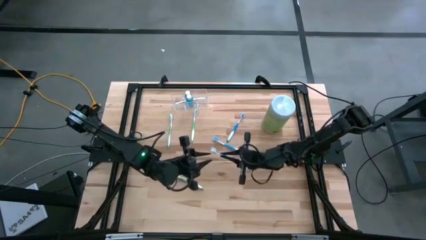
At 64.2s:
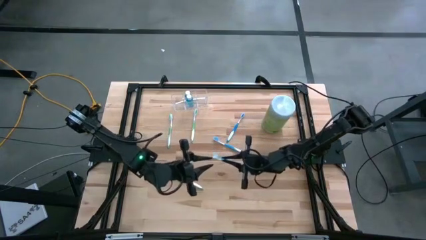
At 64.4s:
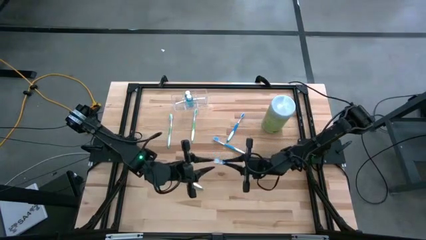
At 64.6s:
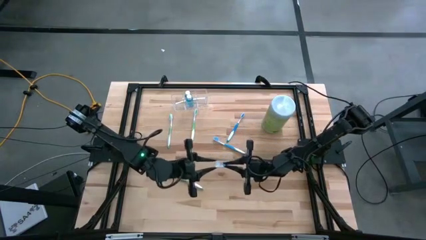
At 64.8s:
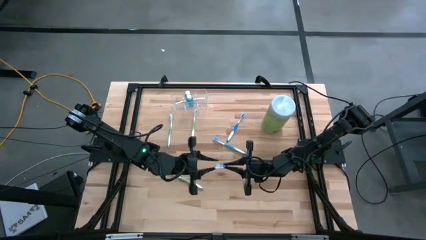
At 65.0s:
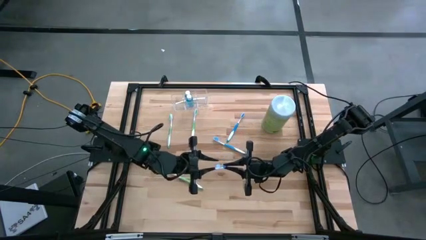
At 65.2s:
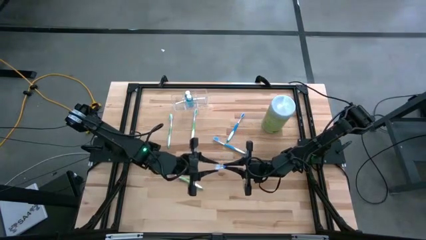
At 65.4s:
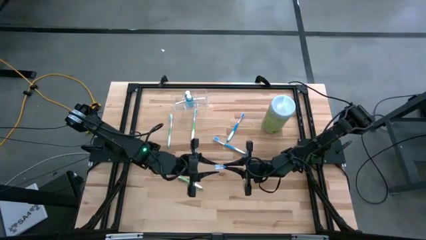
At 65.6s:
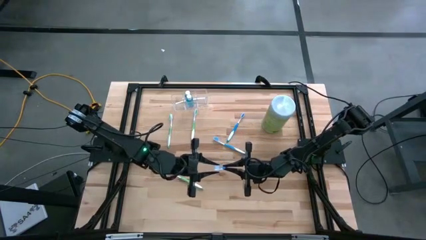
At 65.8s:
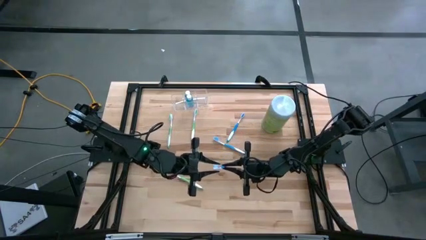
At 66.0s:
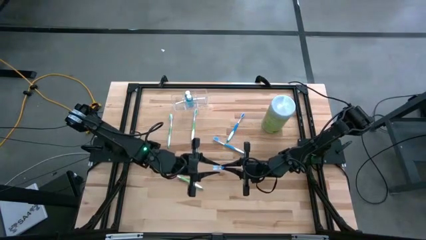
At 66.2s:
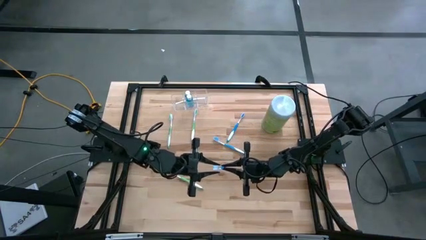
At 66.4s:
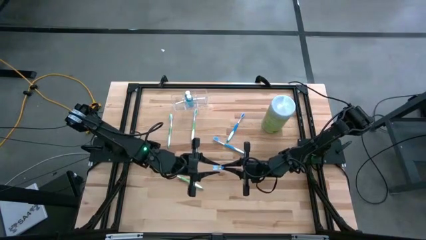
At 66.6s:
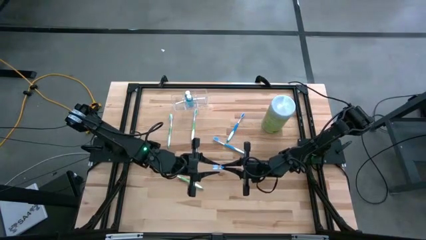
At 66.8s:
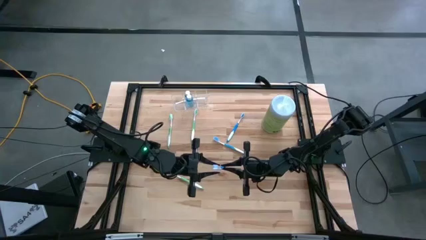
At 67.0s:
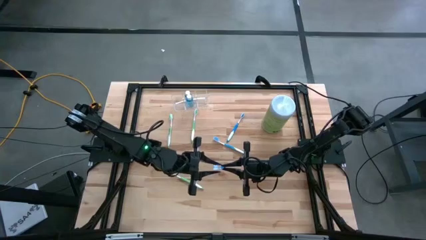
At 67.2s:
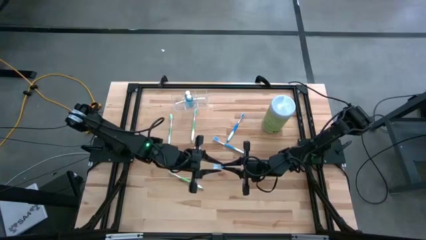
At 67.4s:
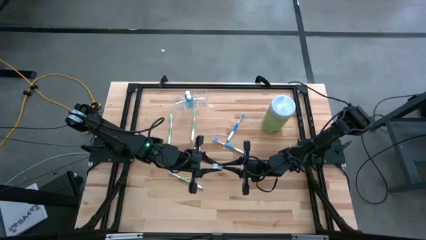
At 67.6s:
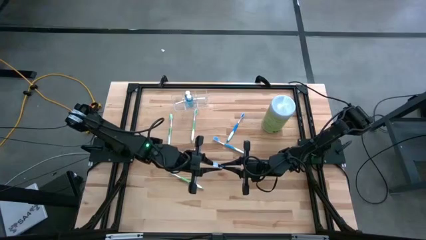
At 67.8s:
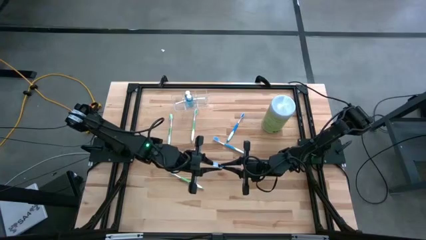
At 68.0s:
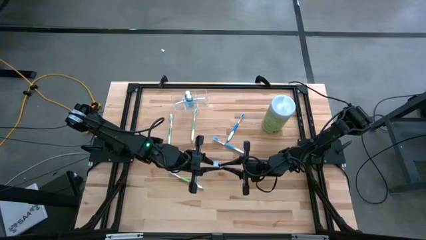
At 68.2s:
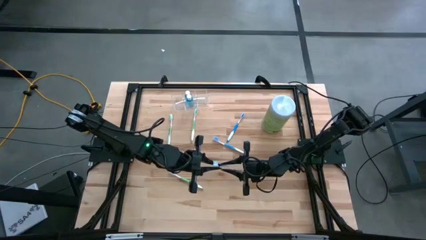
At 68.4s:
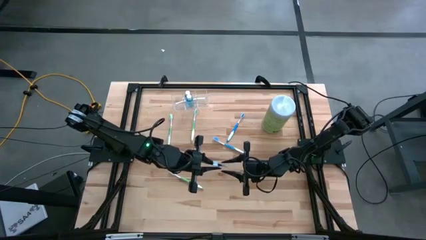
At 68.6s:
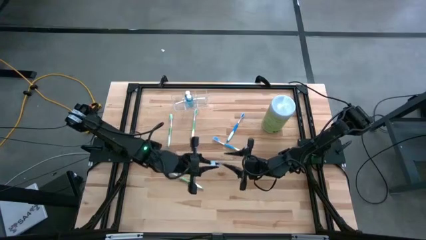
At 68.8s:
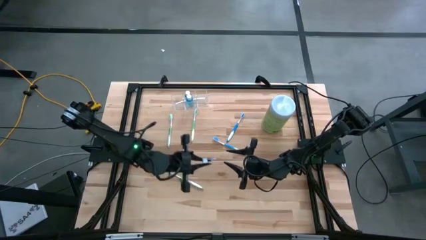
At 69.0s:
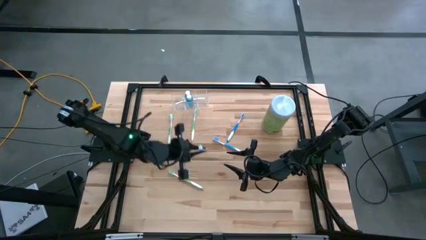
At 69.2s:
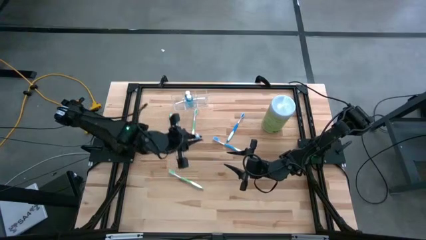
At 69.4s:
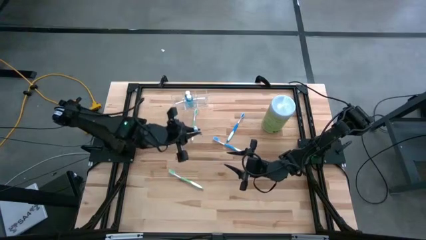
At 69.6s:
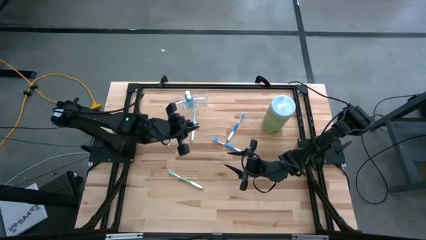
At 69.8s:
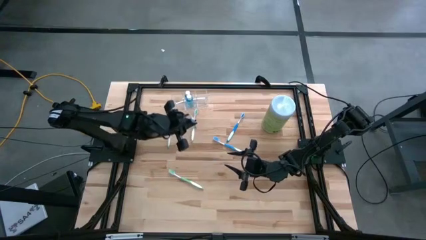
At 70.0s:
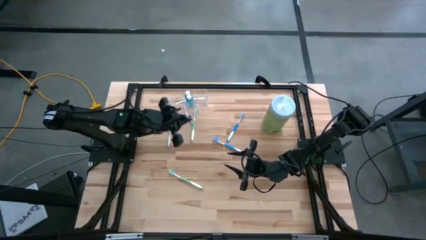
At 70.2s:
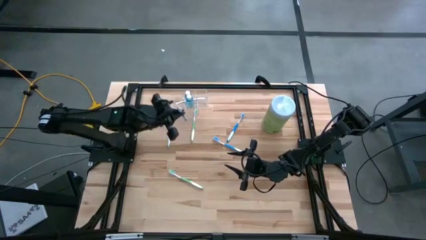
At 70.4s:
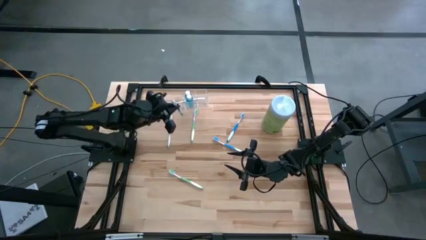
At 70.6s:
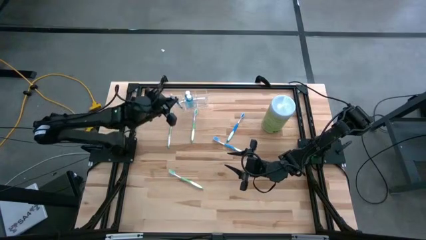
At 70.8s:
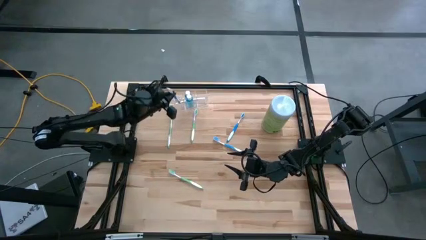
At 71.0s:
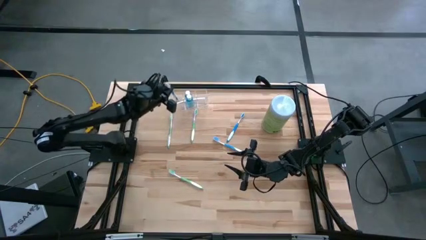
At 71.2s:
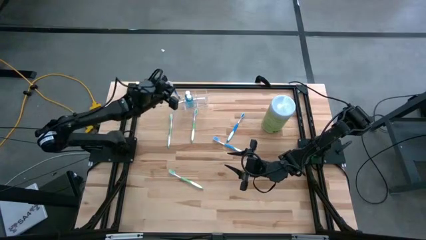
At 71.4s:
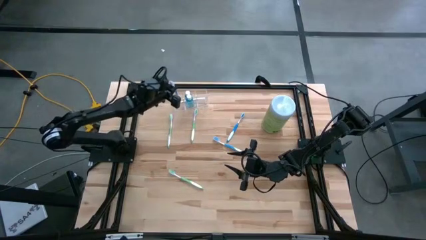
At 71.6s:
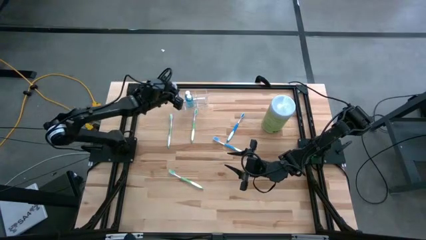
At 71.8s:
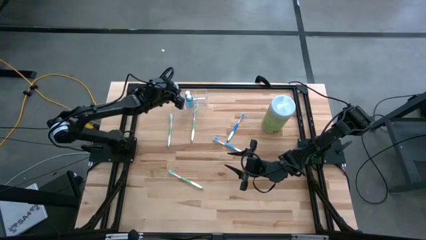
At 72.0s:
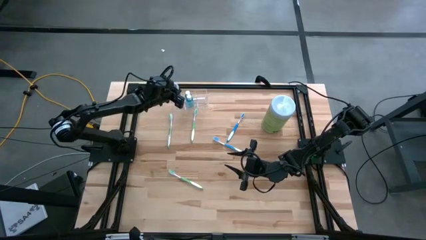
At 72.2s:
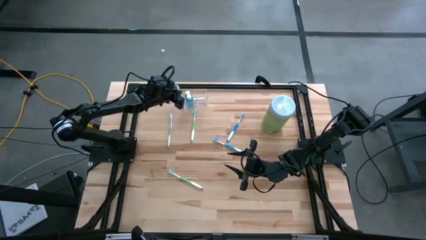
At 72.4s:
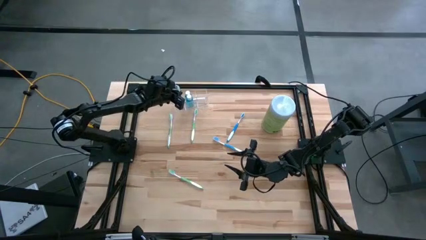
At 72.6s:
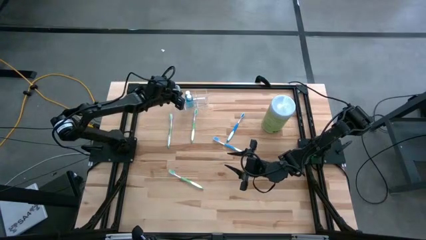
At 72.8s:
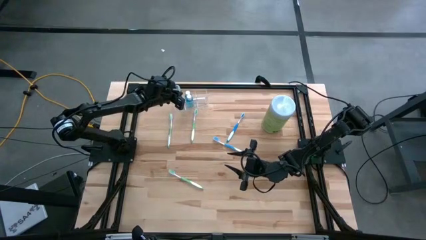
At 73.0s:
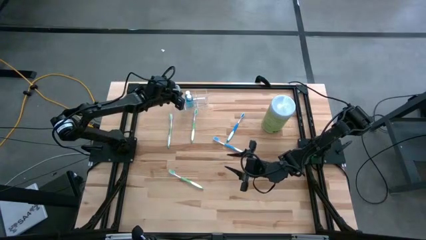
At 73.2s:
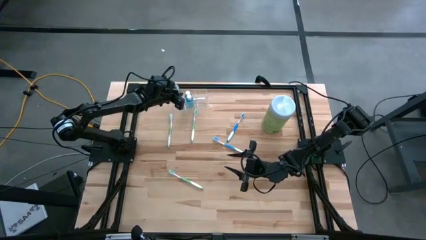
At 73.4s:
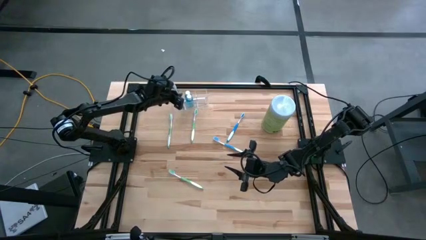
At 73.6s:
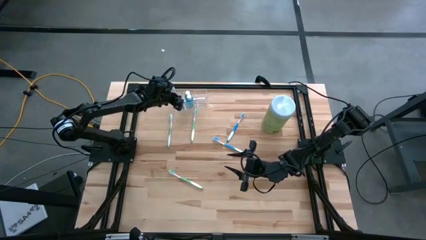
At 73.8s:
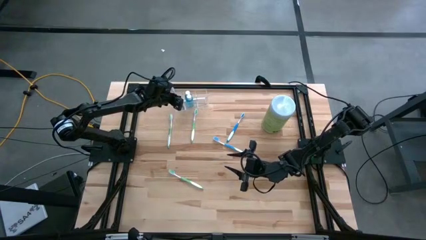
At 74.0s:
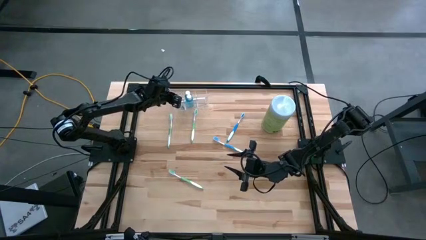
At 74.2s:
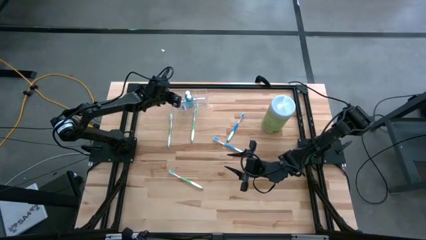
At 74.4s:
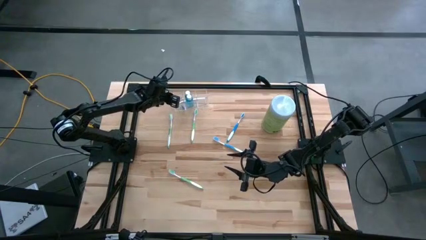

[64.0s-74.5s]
Task: Pick & Place toothbrushing station
Put the top right blue toothbrush into the left section of the transparent organizer

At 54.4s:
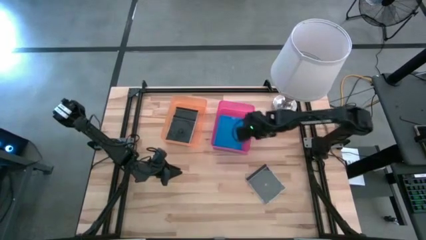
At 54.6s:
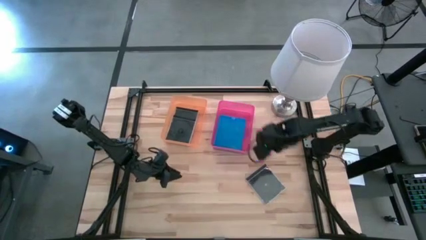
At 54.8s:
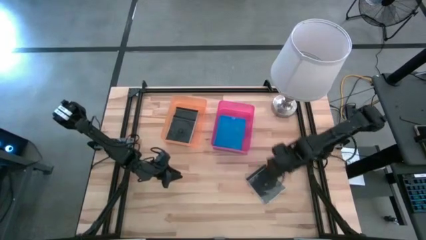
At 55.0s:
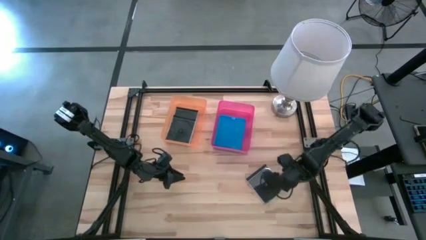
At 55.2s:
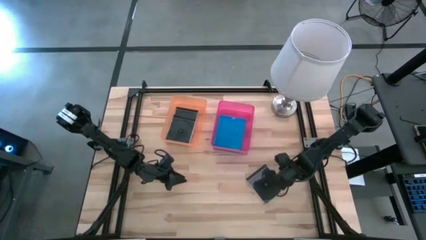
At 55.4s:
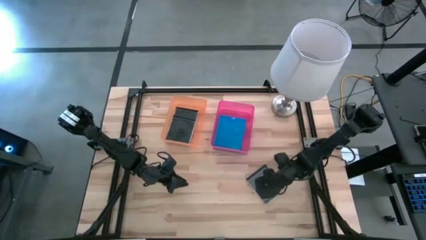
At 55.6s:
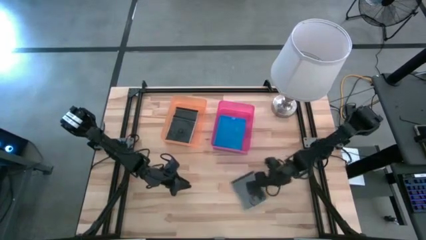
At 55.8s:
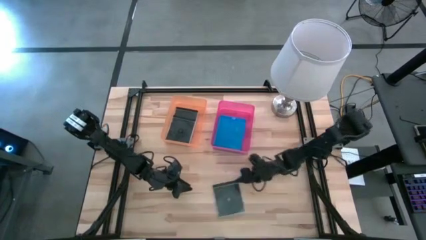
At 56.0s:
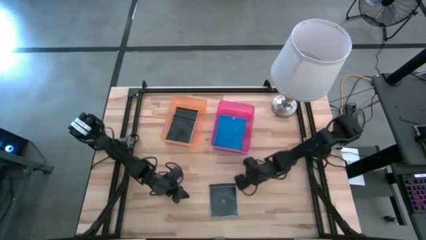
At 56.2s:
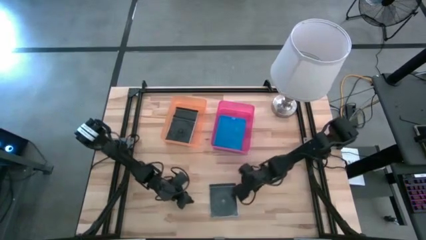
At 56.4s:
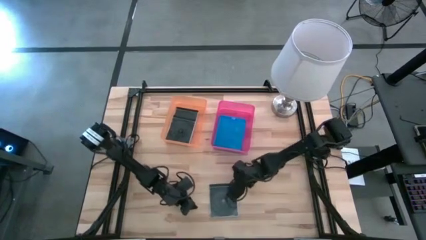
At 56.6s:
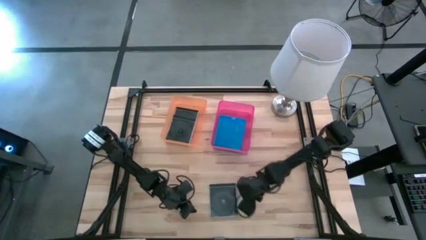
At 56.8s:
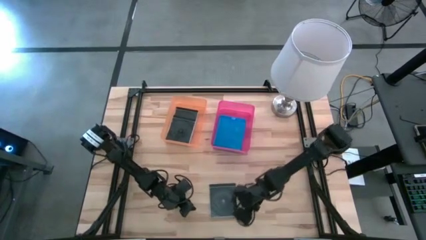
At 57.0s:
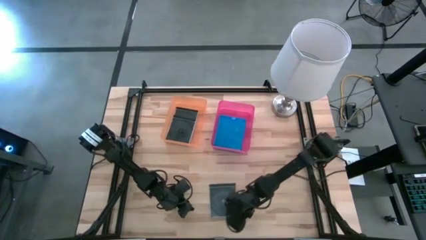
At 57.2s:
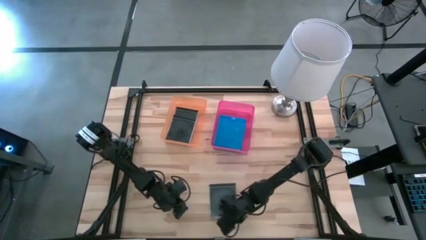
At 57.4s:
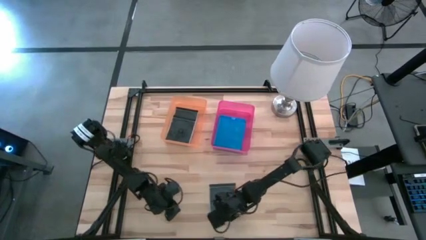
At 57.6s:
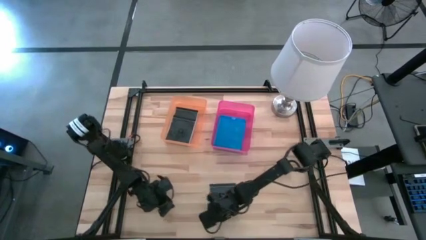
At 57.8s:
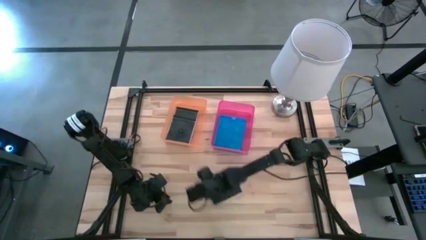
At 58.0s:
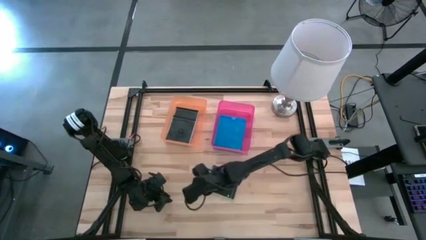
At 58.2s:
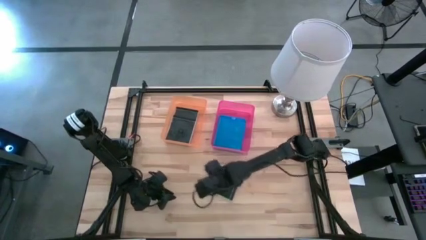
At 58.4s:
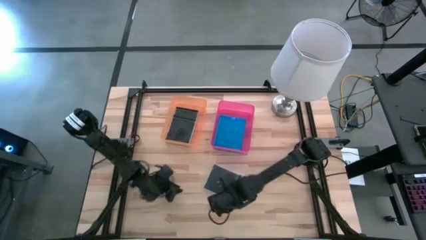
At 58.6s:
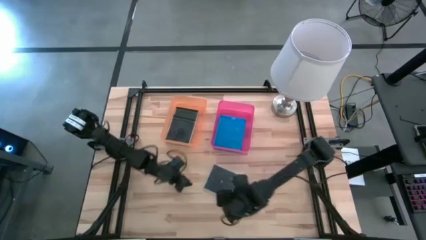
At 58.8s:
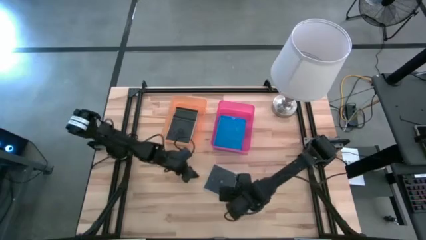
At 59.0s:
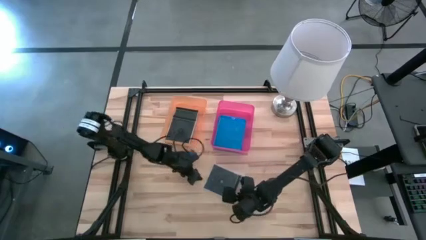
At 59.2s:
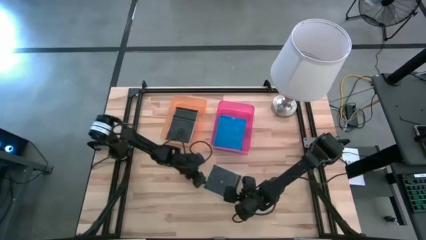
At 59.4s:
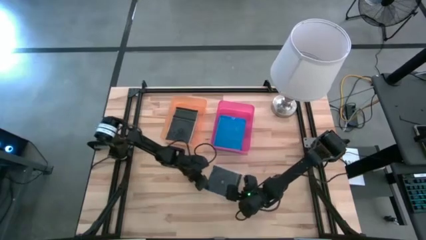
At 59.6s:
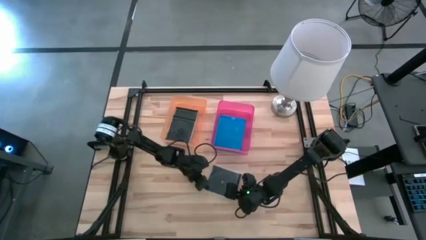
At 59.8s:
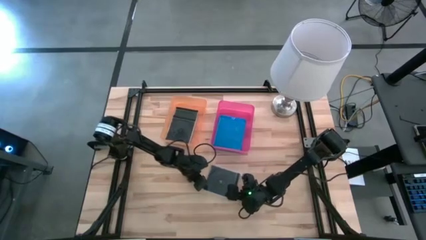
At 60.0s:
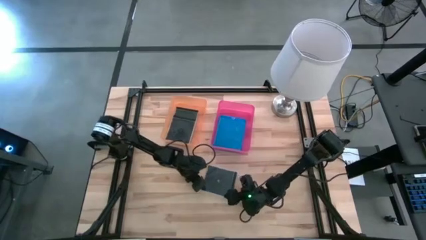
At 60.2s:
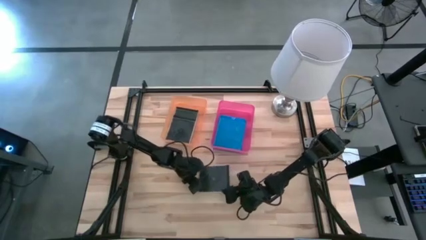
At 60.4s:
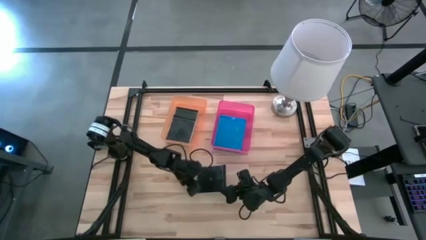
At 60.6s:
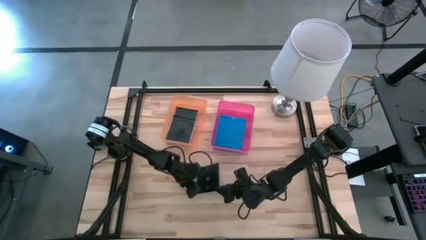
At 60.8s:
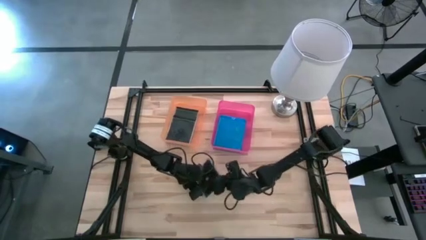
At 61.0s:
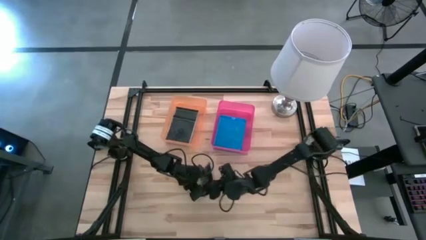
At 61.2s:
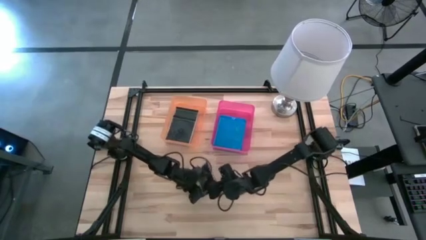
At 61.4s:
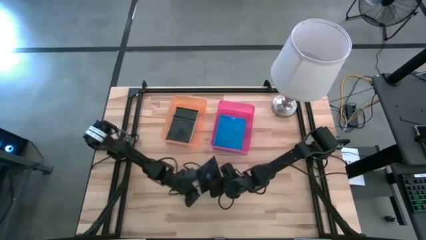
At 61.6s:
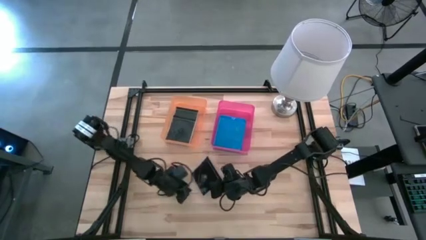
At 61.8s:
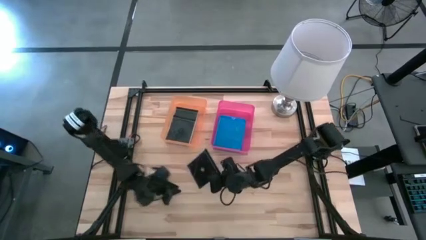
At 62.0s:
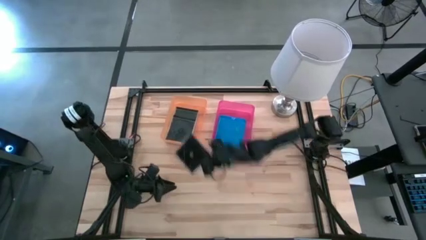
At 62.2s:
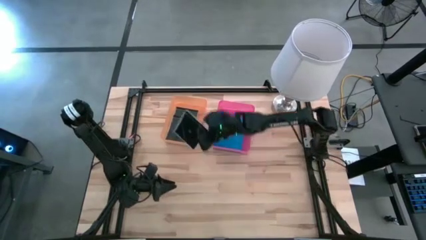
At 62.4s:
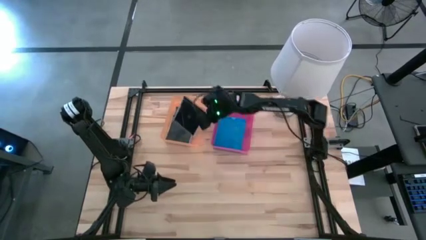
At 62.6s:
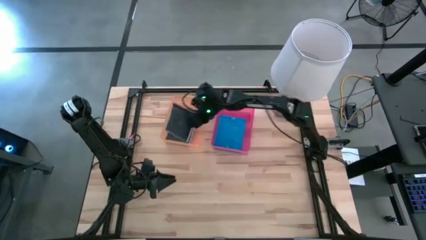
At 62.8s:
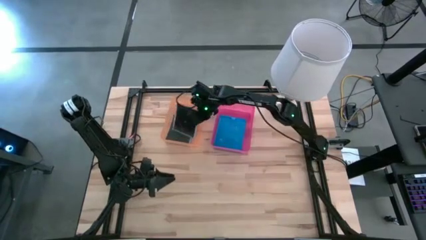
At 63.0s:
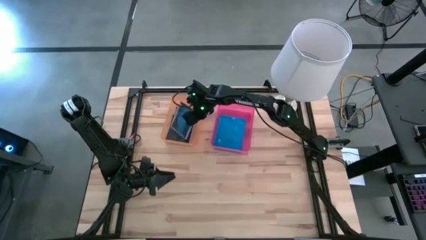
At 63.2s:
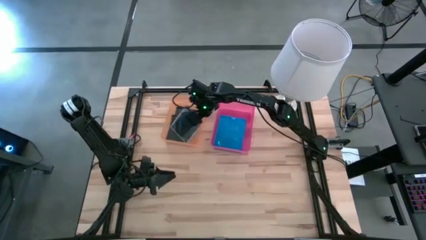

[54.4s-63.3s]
Task: Pick & place jewel cases by type
Put the black CD case into the orange bin
